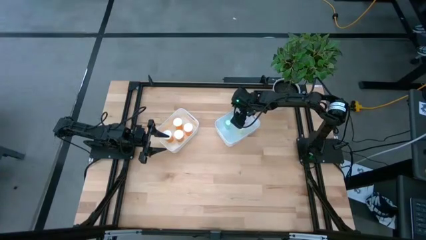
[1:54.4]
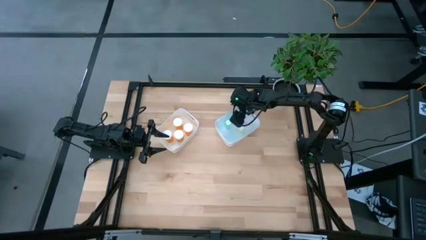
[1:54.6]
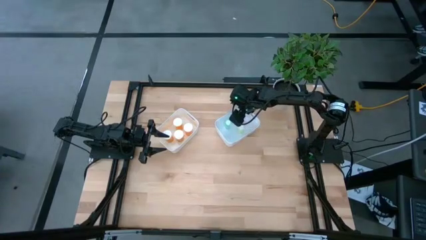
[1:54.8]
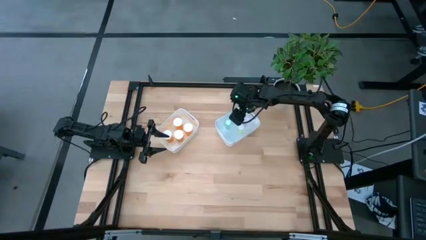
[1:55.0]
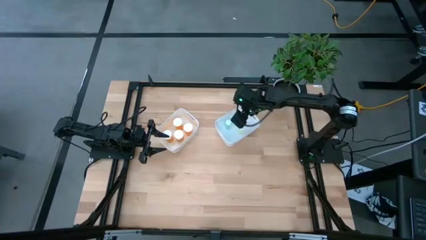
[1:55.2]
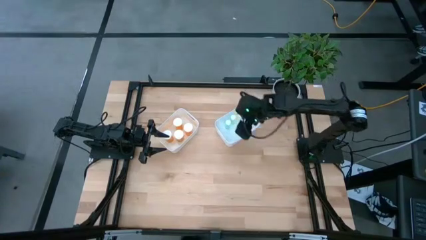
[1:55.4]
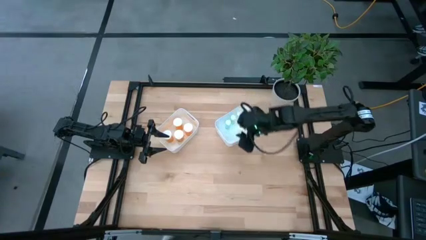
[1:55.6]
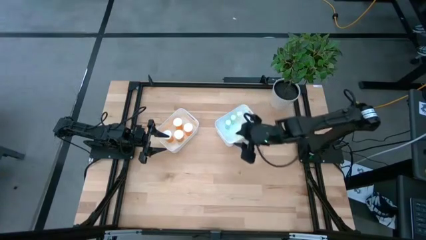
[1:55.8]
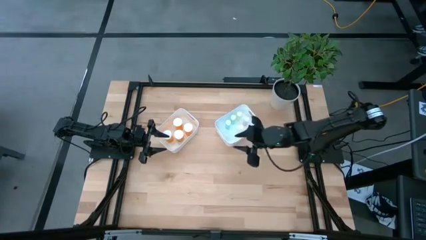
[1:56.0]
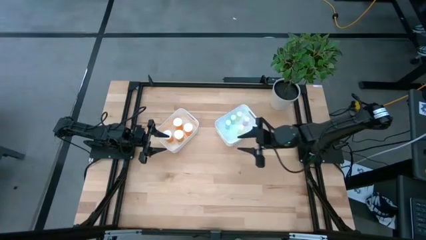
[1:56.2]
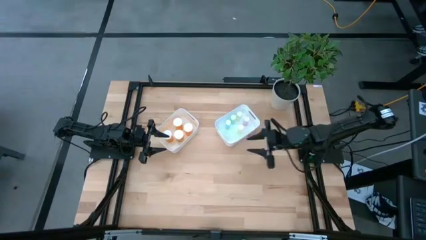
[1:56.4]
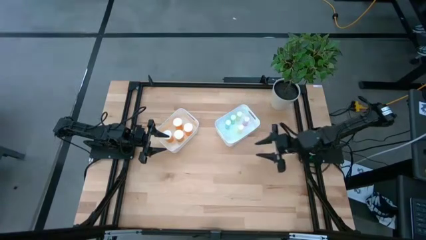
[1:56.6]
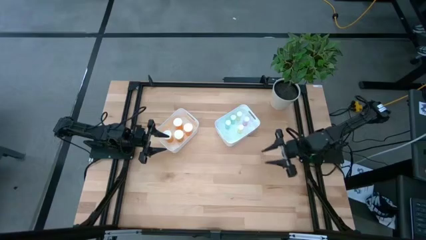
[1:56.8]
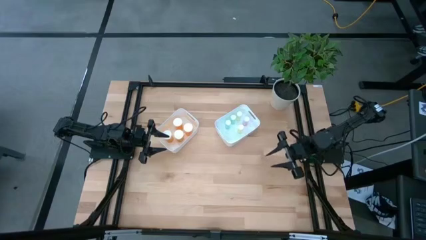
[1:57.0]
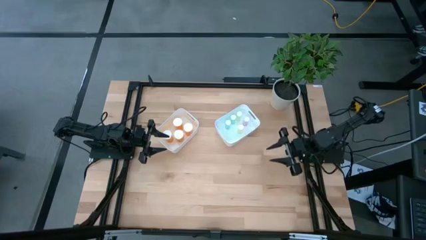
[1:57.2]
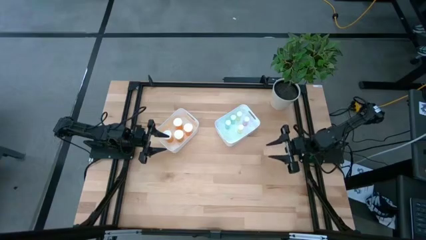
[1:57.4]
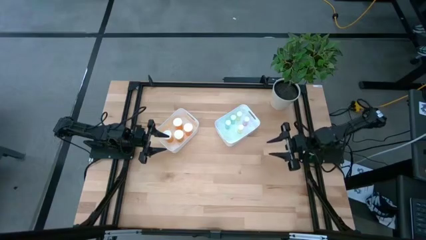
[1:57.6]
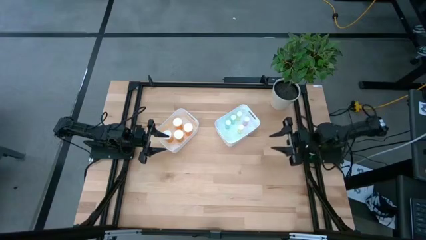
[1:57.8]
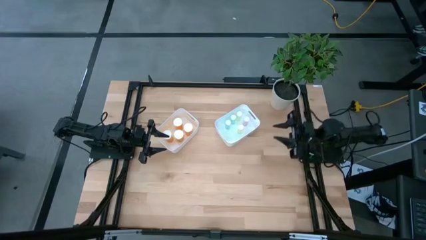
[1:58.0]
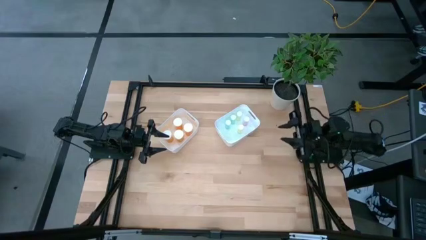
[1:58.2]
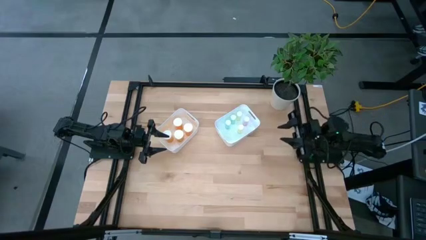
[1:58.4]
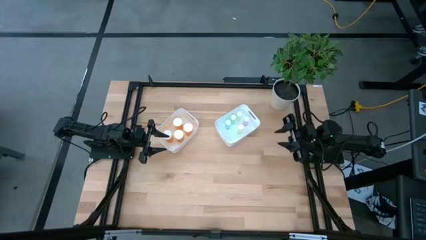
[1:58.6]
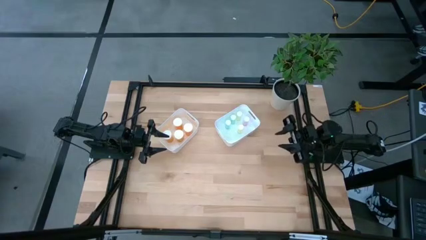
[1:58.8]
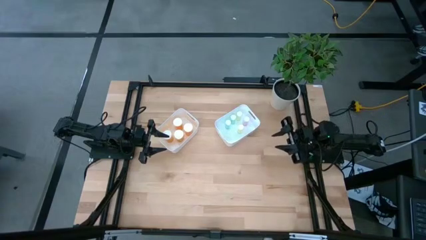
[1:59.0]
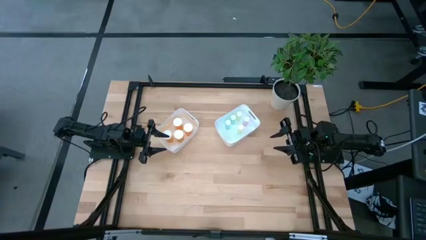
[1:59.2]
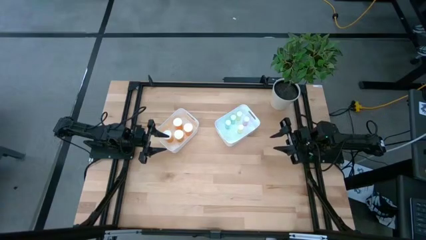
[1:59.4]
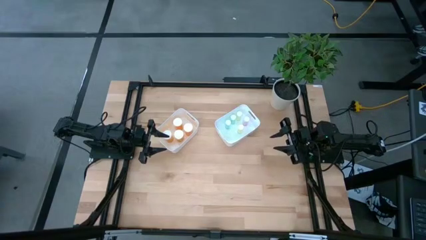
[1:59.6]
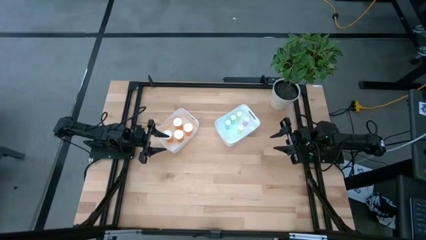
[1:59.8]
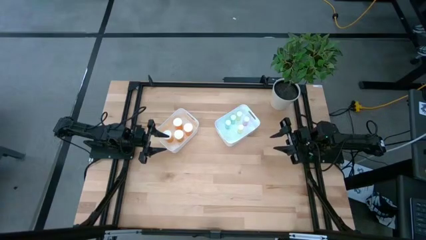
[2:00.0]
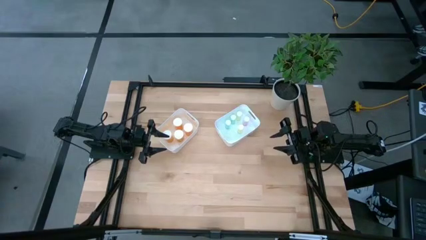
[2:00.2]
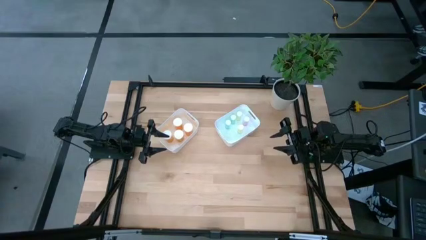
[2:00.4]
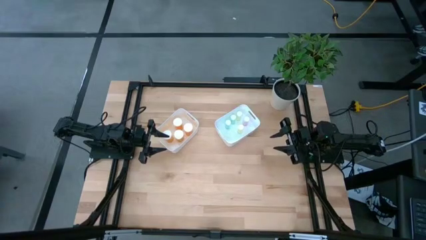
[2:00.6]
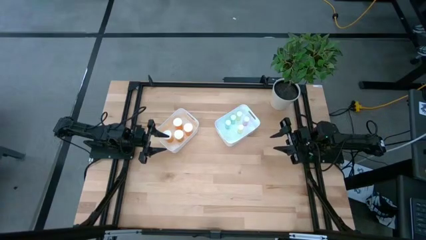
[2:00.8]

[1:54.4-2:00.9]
Task: Pick and place medicine bottles into bin by pill shape (circle, oval)
Return to Home Position

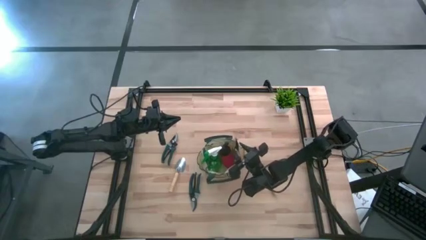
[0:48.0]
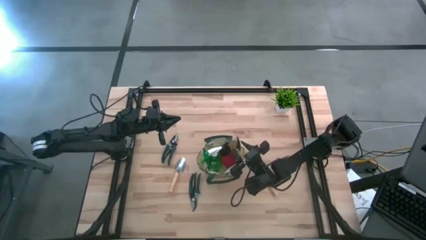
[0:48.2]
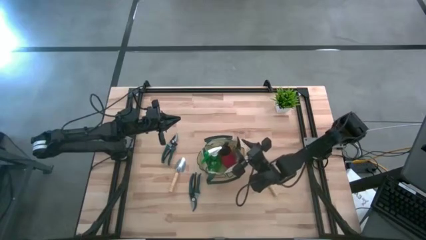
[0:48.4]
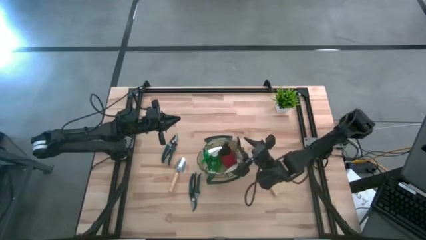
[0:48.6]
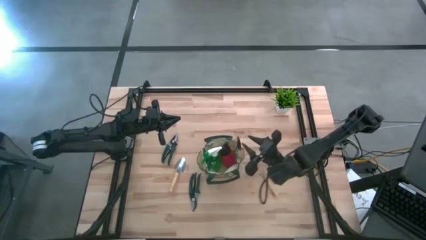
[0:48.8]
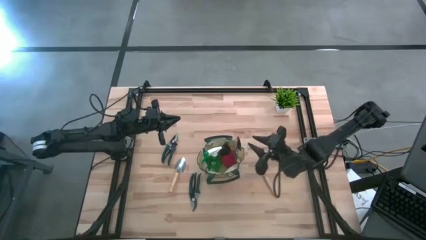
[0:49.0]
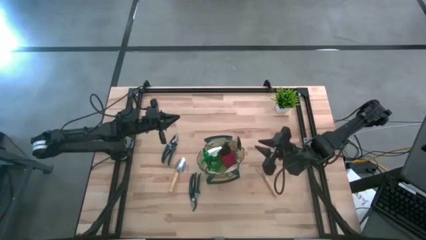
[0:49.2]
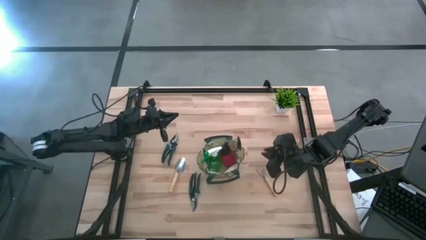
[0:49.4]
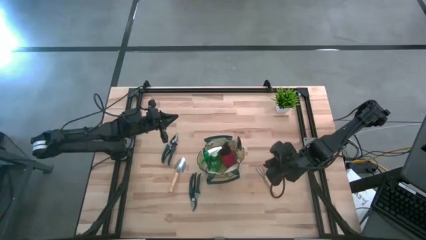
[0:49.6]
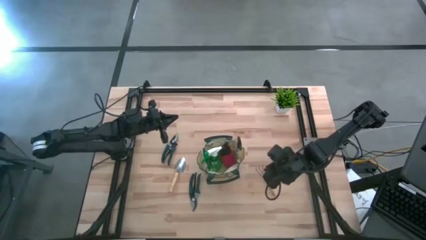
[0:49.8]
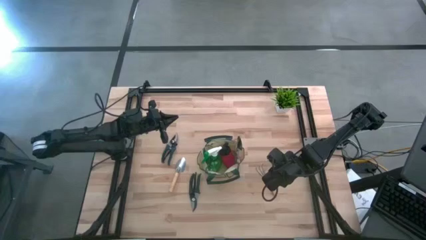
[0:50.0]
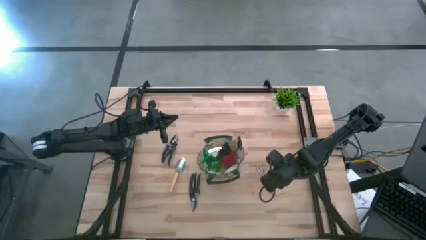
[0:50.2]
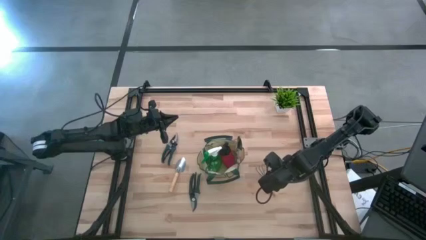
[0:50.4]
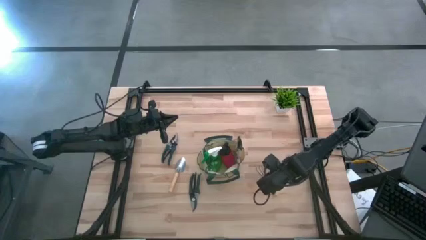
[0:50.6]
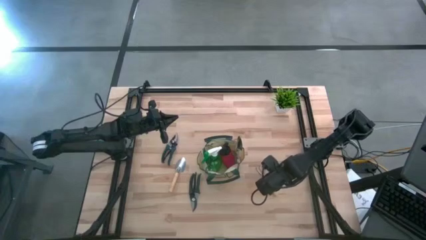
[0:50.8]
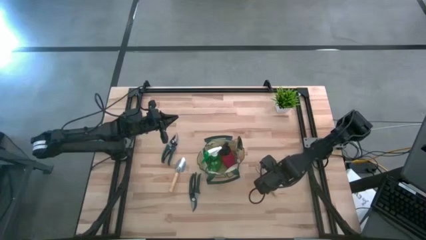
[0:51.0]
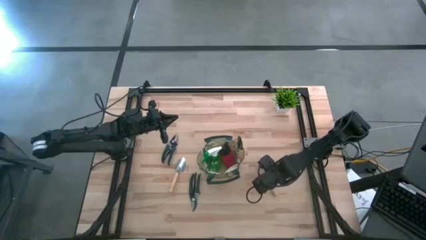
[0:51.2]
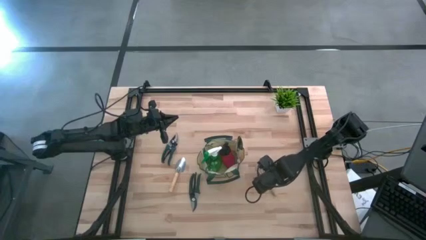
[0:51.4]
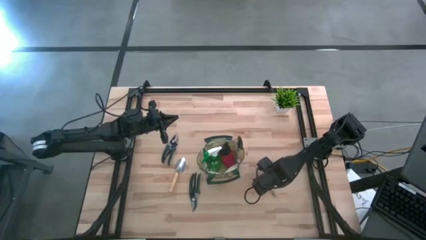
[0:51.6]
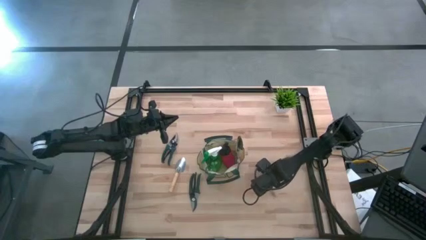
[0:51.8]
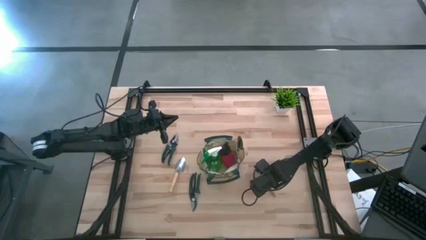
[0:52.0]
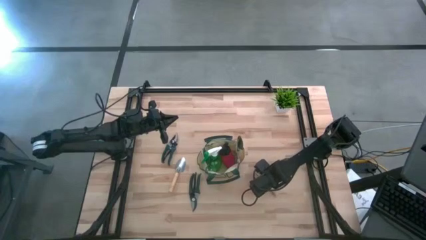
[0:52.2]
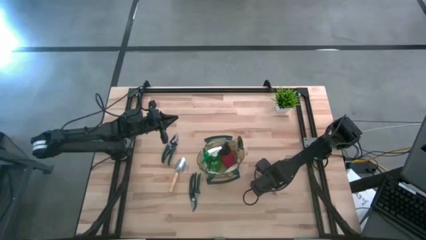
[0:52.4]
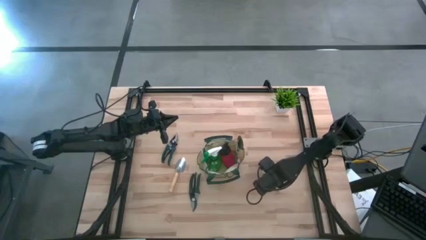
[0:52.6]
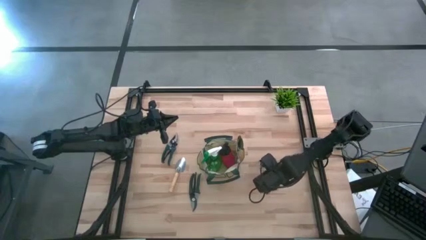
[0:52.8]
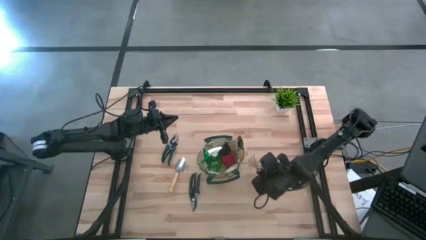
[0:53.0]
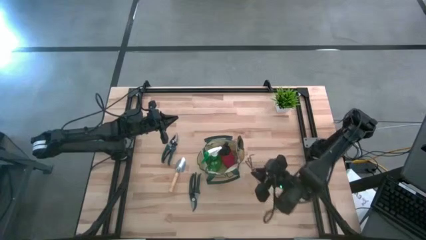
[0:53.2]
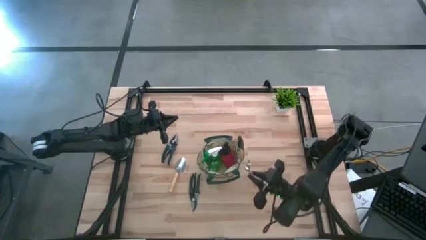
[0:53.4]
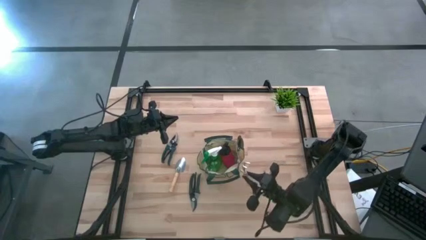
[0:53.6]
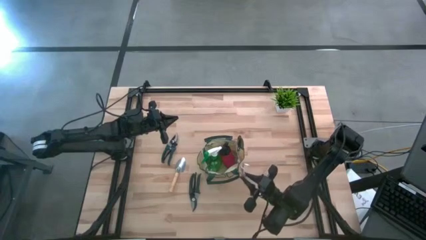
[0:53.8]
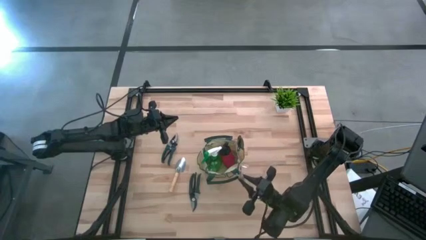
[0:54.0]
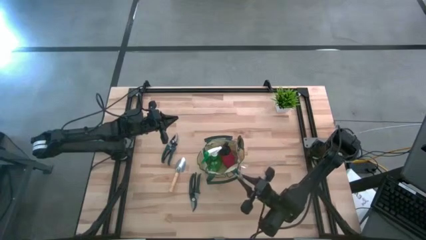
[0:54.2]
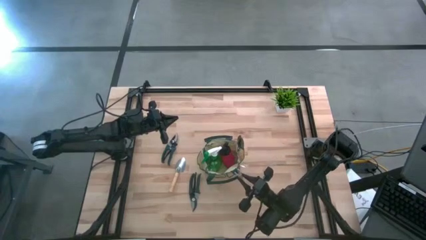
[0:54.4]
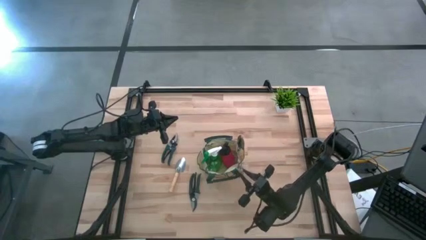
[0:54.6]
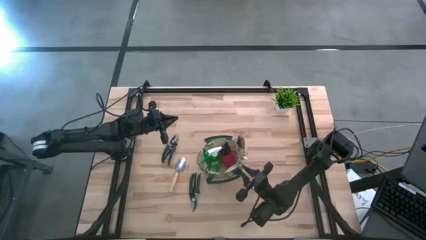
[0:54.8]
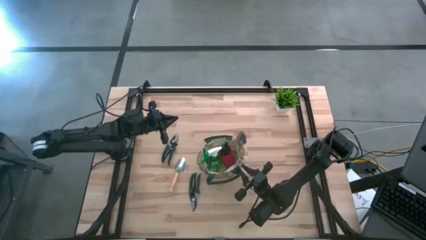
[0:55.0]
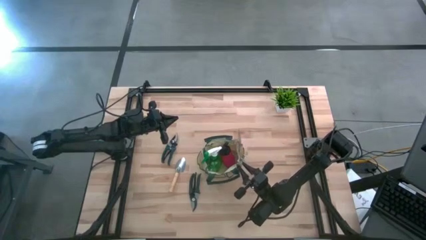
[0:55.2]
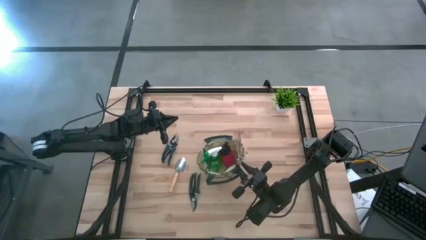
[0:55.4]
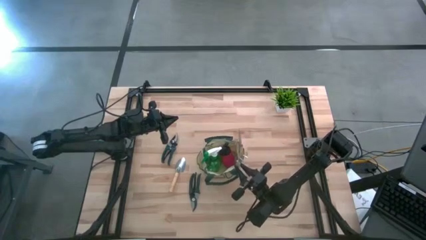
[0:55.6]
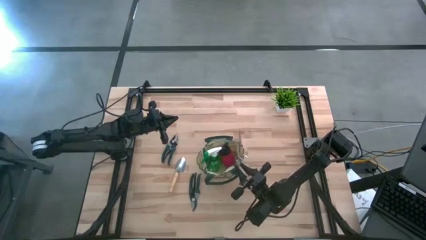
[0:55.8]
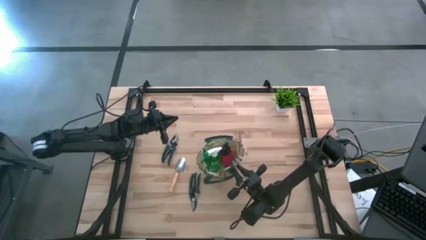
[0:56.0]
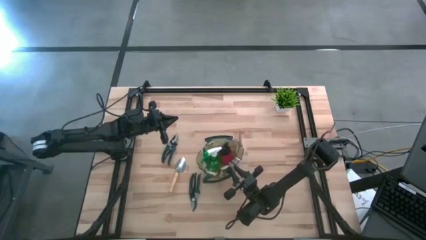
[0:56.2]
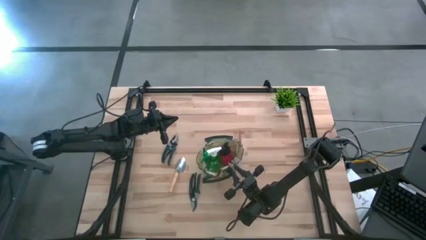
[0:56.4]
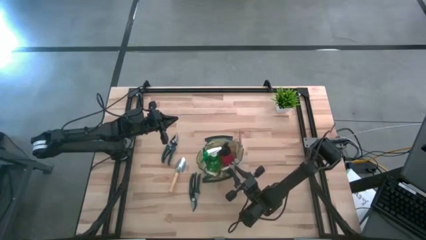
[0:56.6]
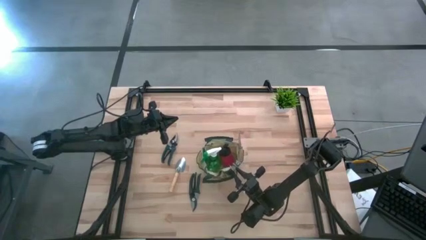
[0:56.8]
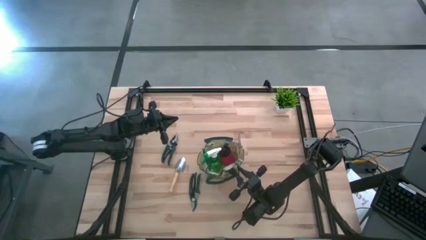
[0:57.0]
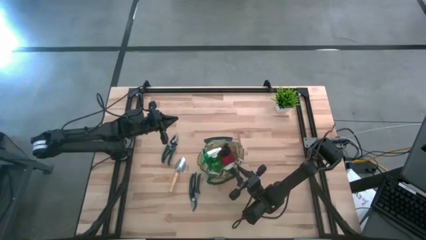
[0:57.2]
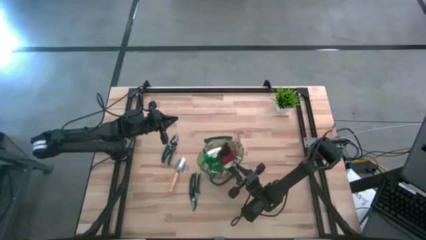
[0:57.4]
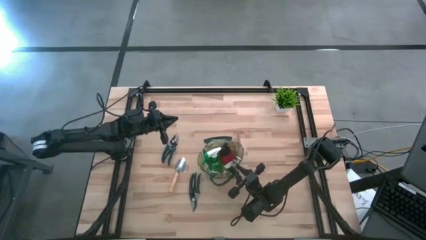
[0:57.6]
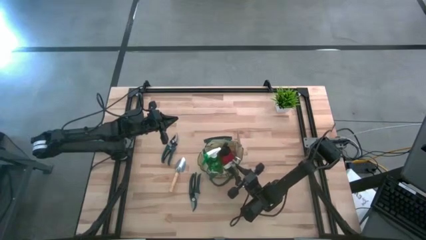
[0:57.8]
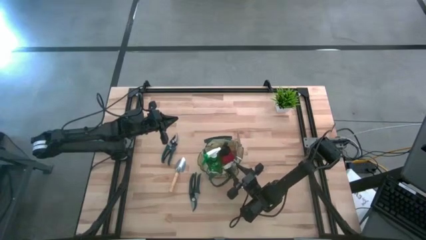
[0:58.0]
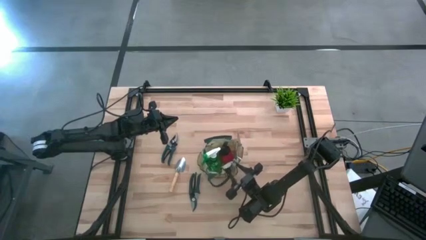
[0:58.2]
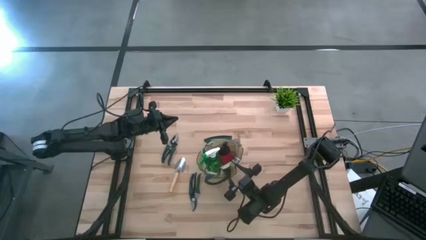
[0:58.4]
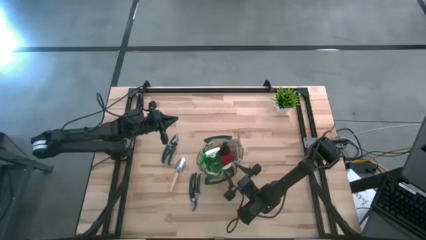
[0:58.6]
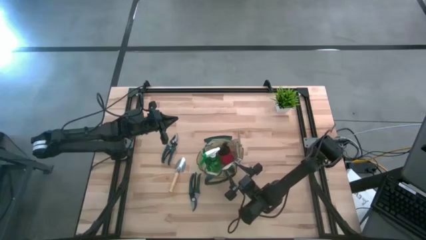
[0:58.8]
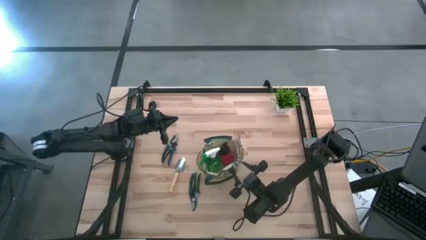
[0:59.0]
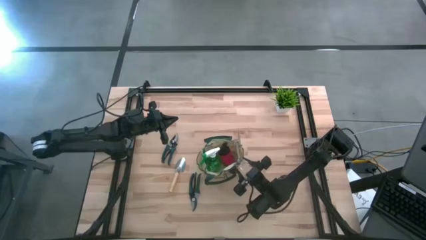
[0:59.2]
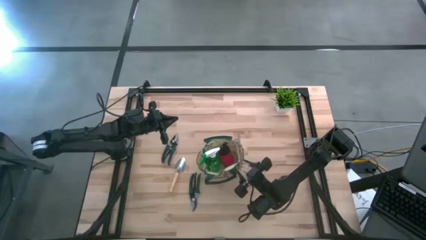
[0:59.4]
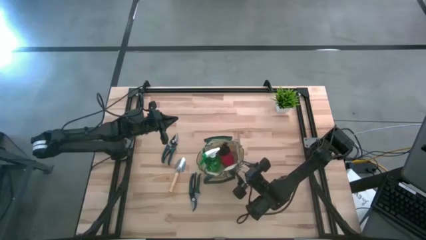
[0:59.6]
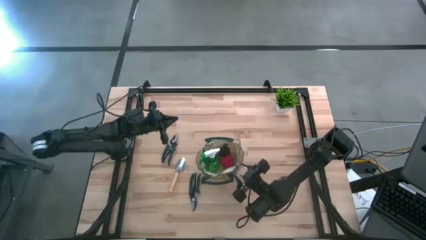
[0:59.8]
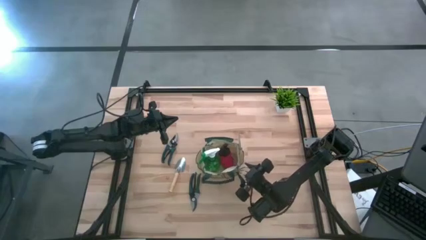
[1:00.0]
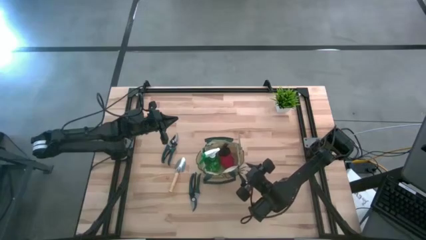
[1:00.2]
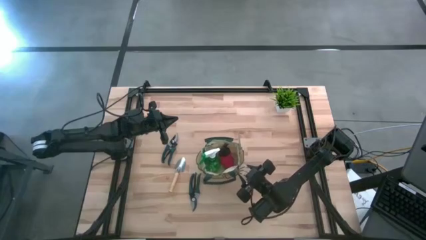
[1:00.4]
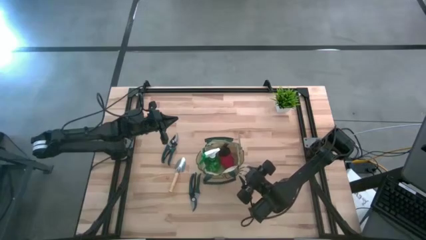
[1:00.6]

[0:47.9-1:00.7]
Task: Pick & Place Garden tools in Gardening bag
Put the brown hand rake into the white gardening bag
